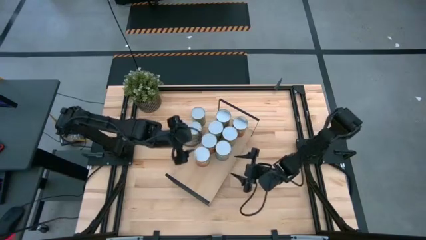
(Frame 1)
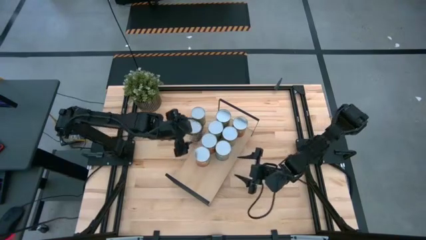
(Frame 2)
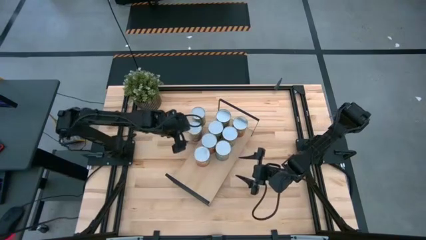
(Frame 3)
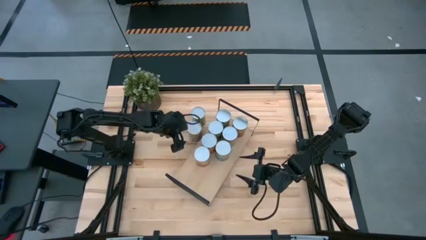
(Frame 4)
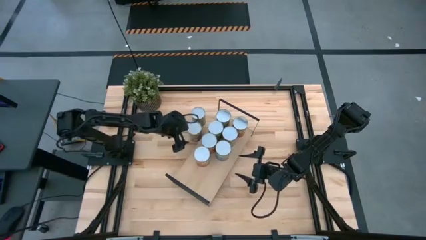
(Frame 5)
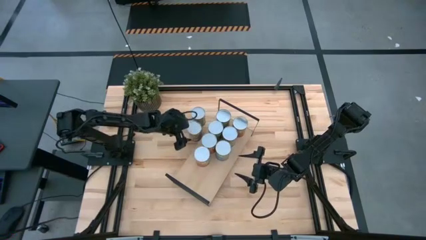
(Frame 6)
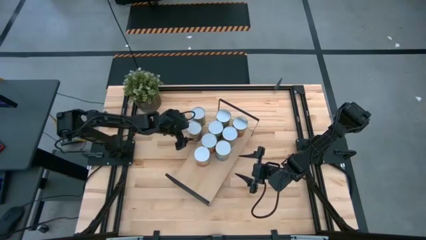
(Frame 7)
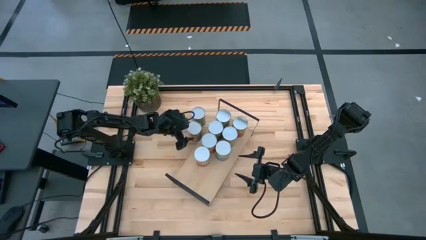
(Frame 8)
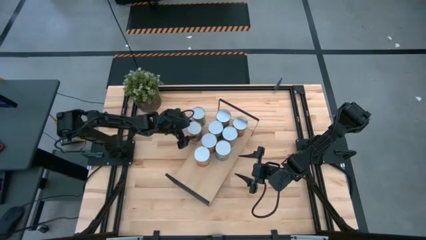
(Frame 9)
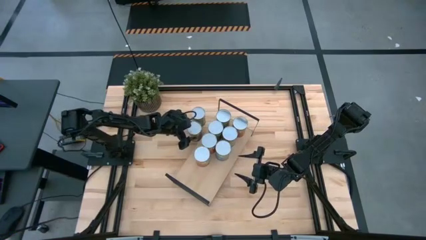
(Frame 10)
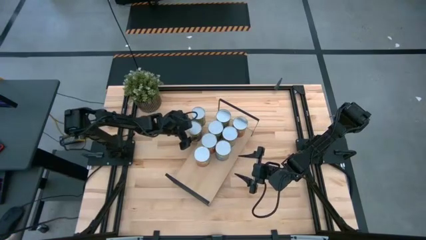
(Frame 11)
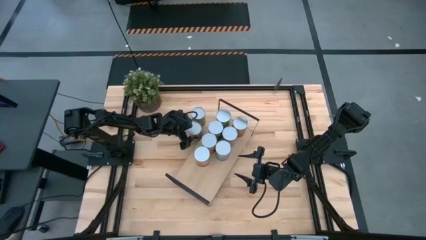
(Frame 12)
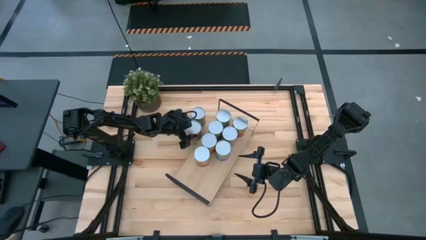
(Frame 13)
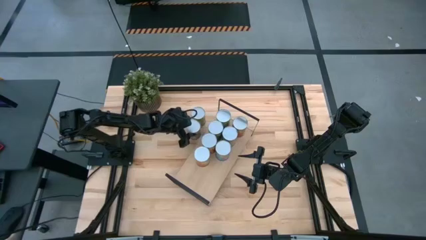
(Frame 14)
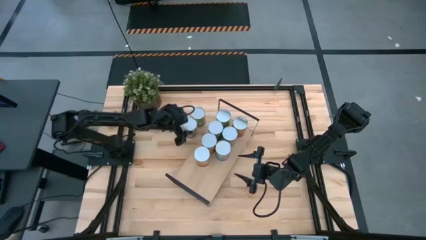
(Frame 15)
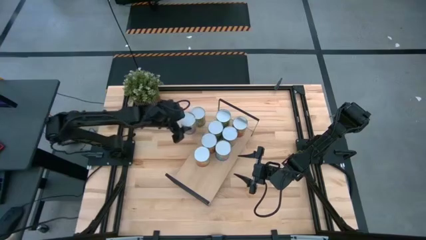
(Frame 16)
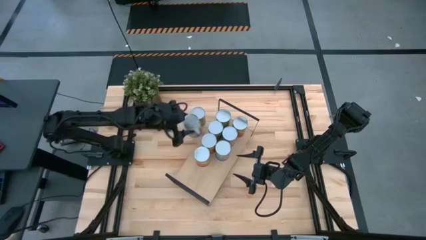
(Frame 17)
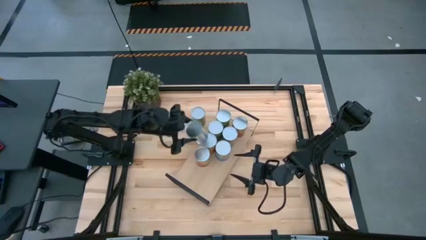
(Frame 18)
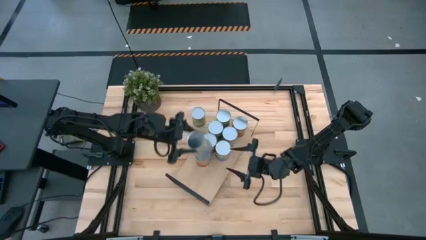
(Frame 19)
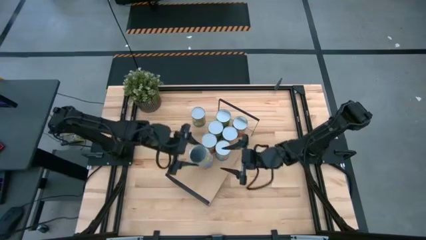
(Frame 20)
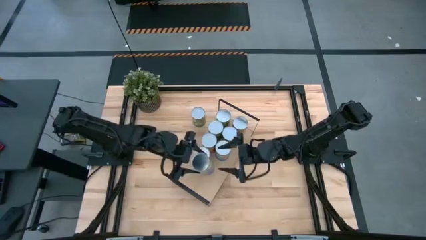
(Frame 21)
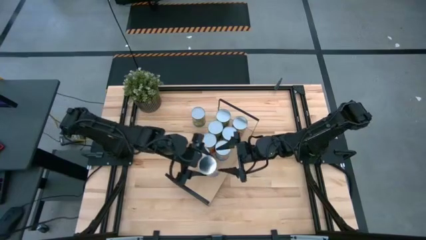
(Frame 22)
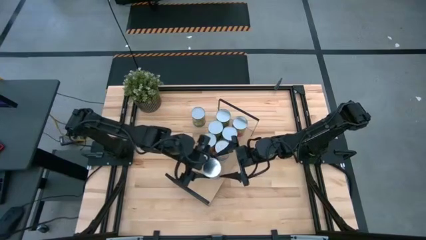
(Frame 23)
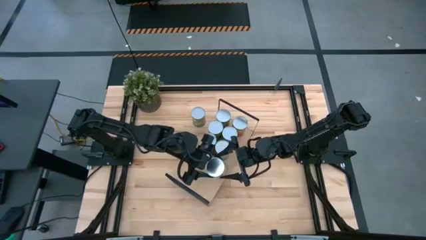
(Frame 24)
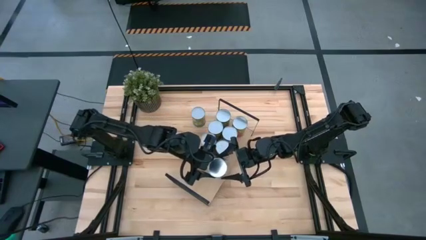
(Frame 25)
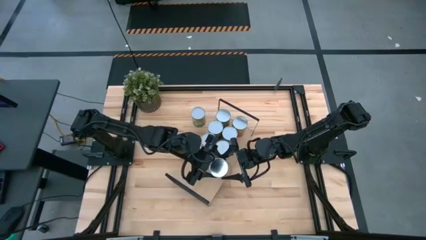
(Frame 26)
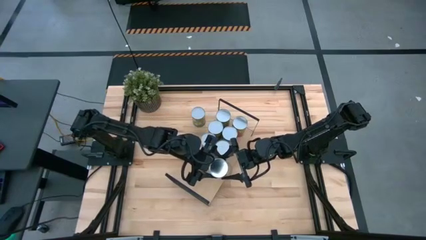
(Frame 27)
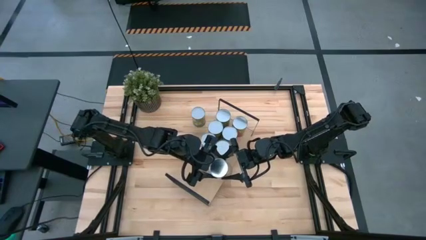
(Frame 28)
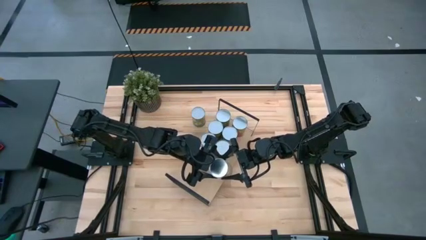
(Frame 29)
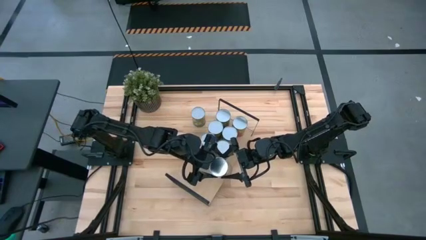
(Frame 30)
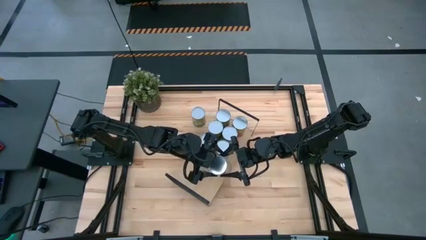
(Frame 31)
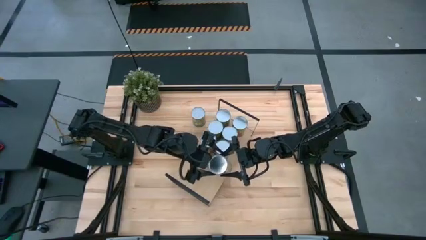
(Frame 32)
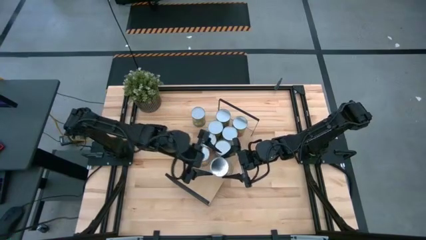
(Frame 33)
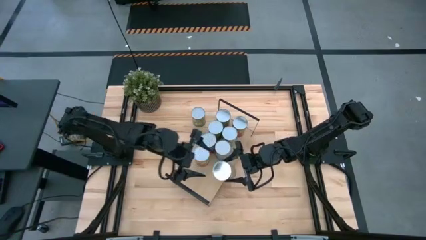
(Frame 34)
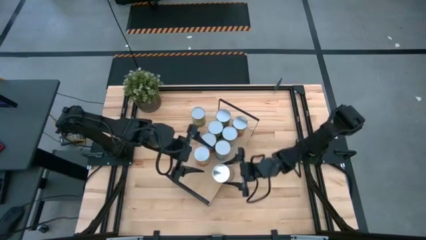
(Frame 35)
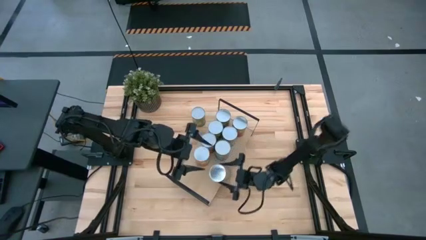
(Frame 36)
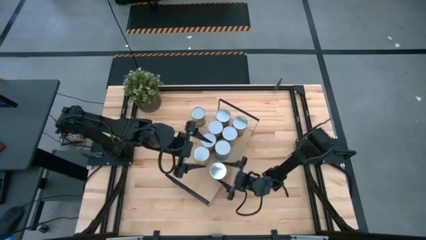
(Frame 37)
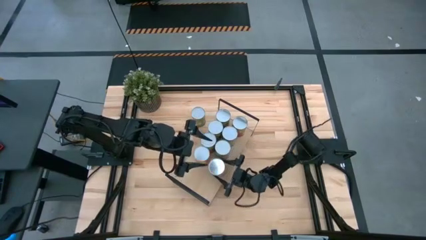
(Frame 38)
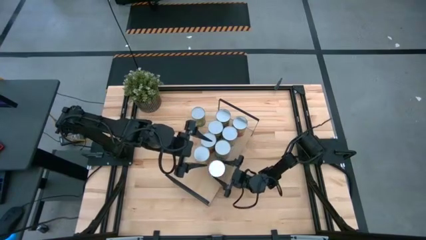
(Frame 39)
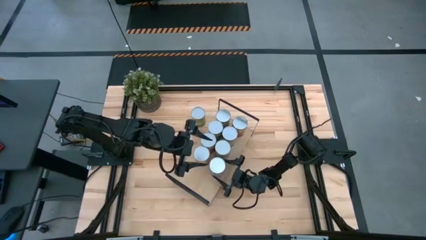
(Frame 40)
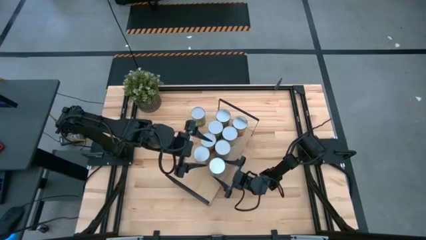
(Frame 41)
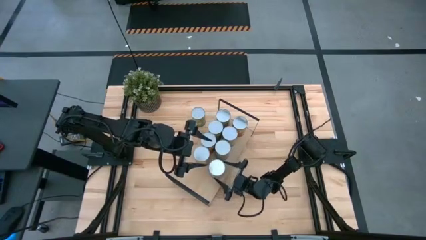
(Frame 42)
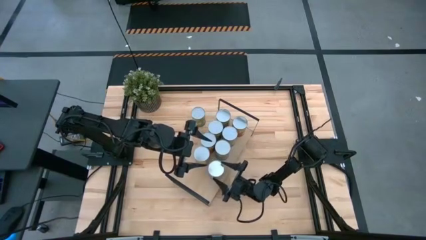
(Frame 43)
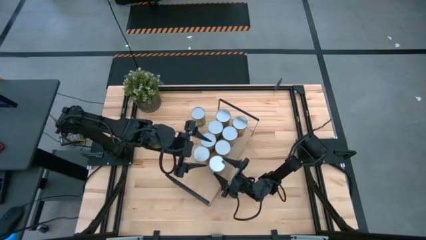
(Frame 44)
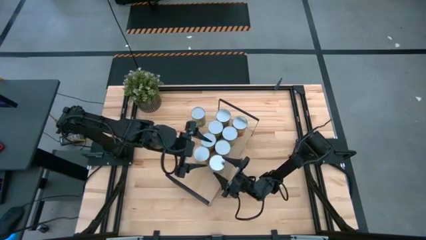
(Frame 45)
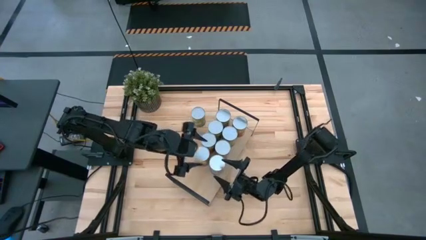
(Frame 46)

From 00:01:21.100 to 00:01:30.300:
Task: Pick and place cans onto a shelf
Put the canned peaches on the shelf

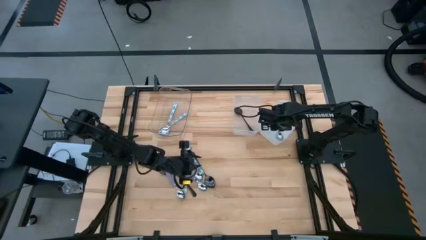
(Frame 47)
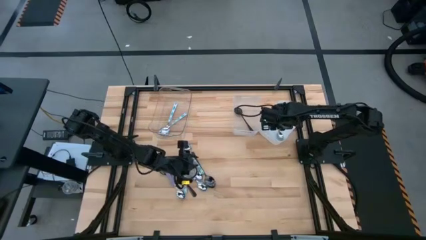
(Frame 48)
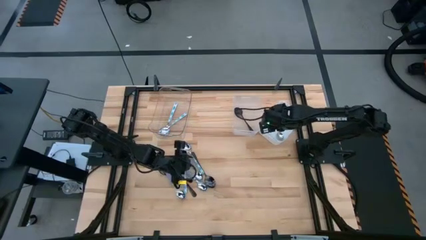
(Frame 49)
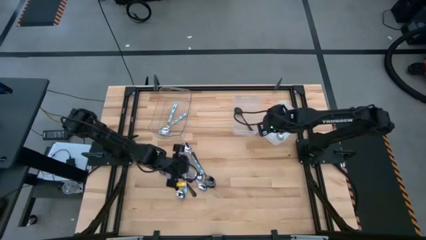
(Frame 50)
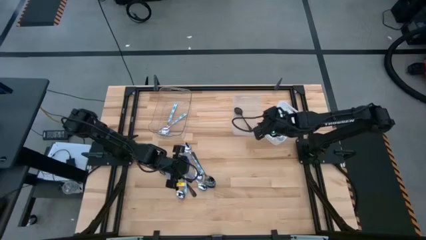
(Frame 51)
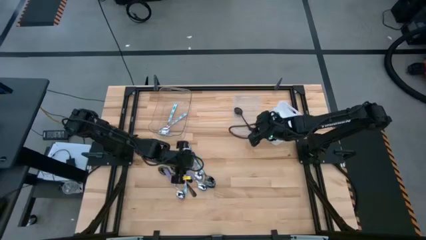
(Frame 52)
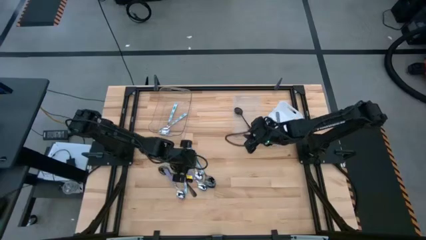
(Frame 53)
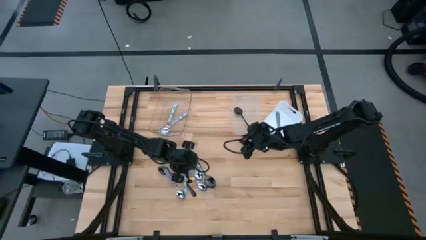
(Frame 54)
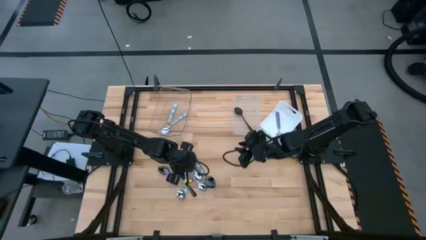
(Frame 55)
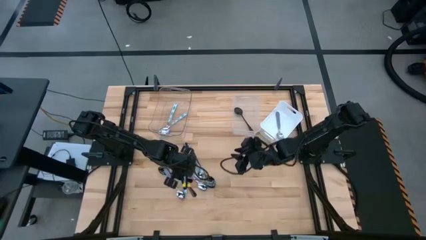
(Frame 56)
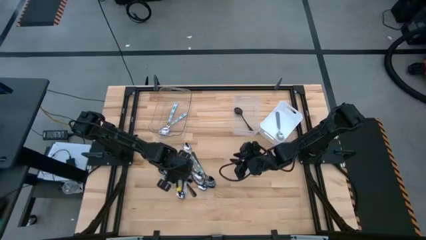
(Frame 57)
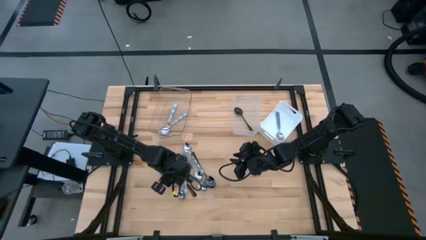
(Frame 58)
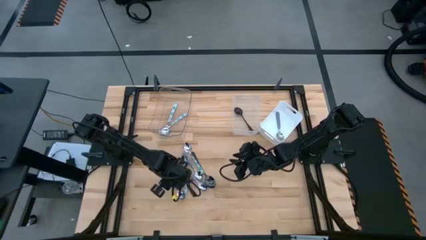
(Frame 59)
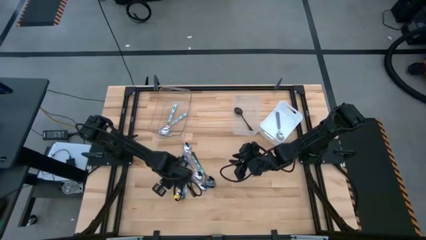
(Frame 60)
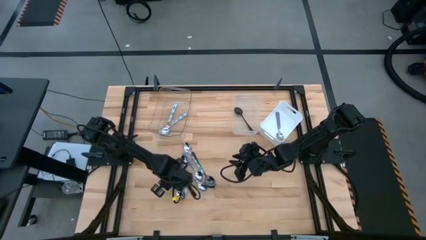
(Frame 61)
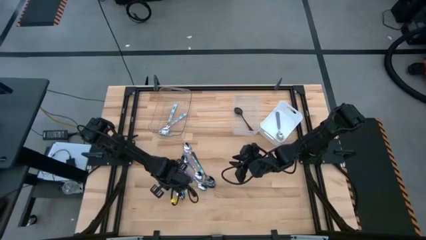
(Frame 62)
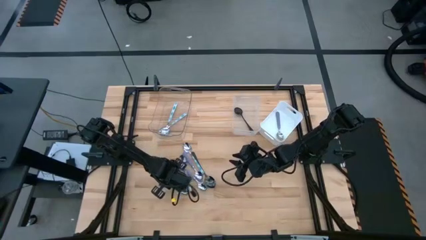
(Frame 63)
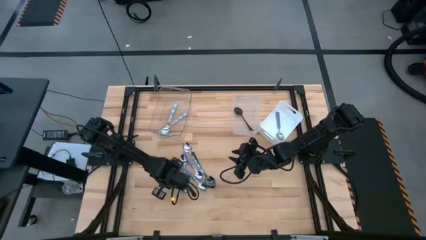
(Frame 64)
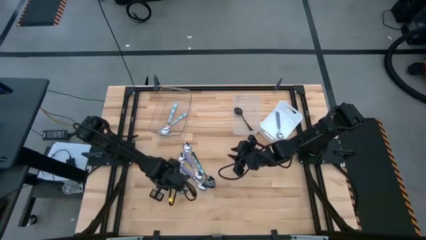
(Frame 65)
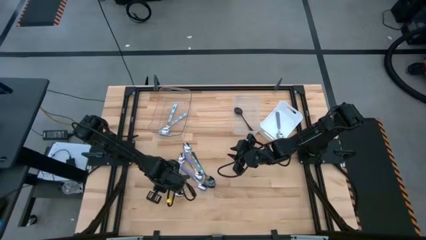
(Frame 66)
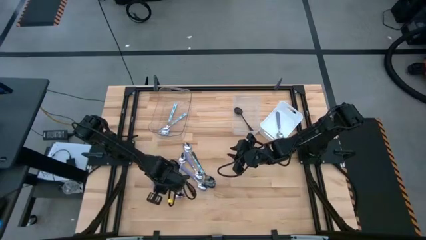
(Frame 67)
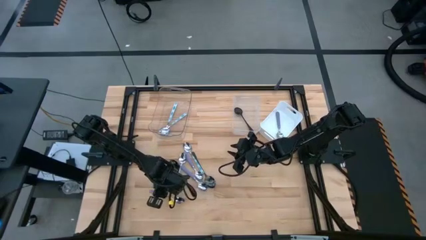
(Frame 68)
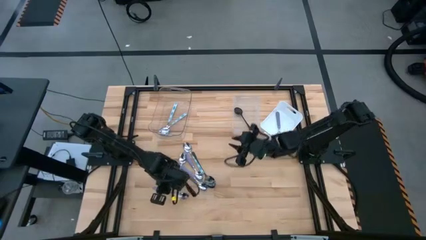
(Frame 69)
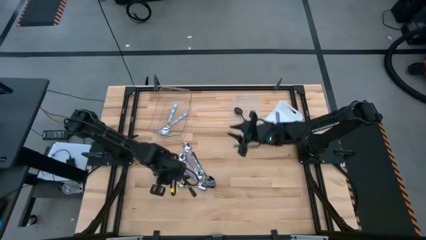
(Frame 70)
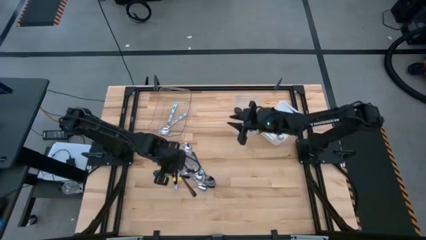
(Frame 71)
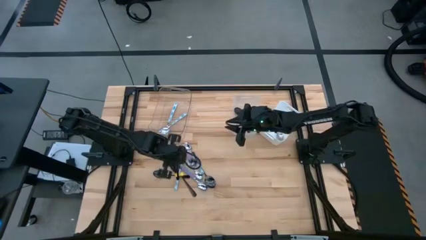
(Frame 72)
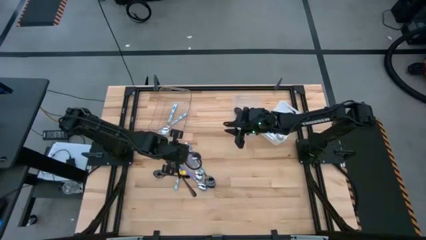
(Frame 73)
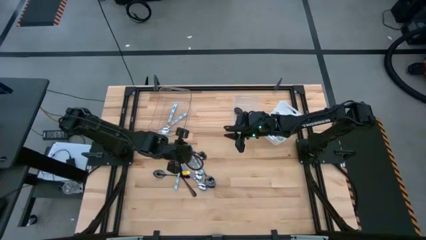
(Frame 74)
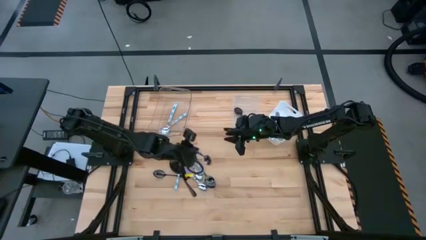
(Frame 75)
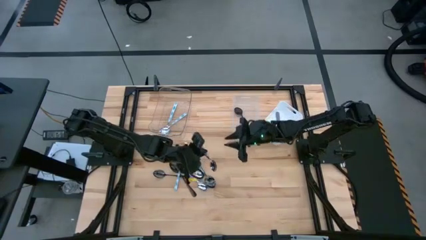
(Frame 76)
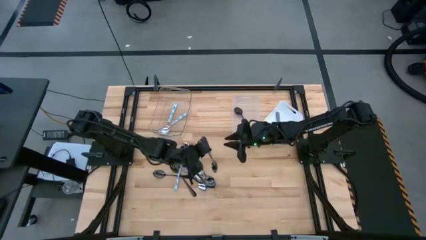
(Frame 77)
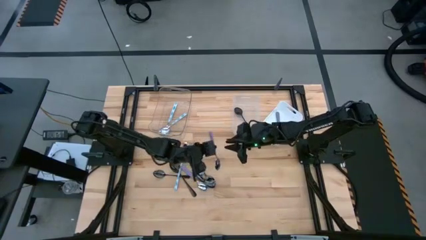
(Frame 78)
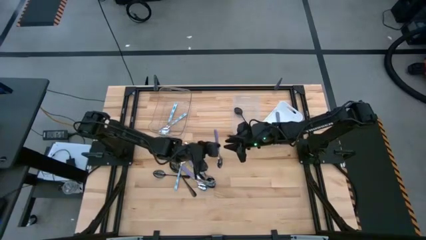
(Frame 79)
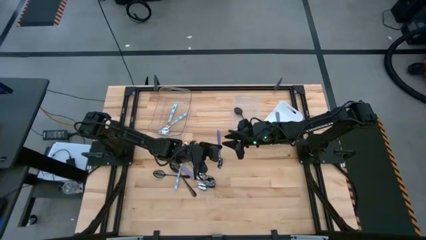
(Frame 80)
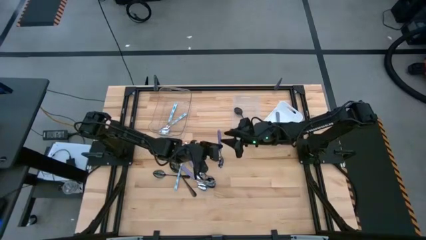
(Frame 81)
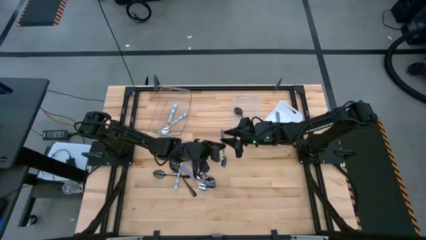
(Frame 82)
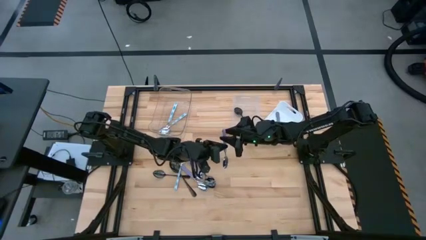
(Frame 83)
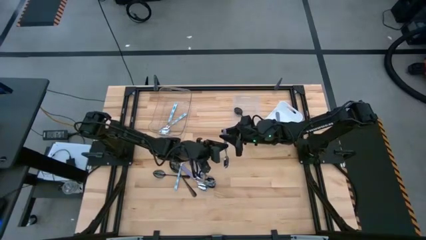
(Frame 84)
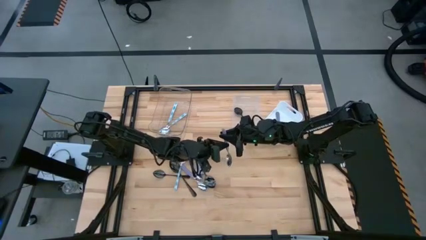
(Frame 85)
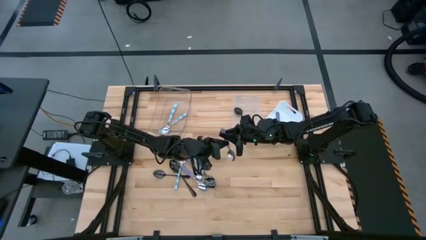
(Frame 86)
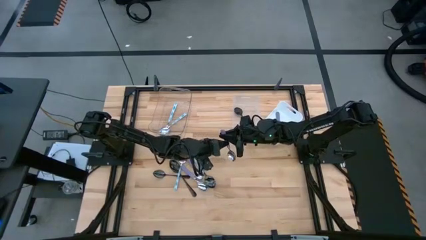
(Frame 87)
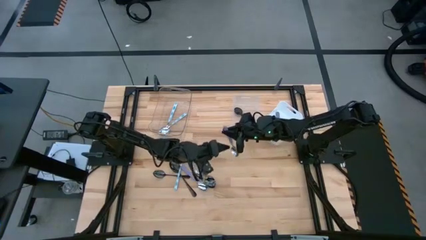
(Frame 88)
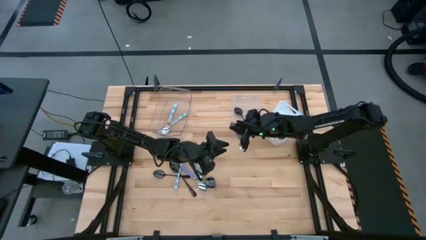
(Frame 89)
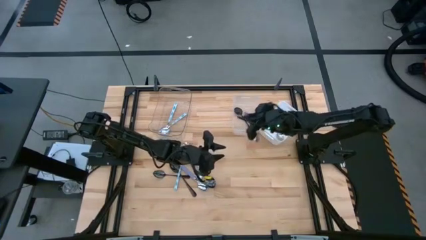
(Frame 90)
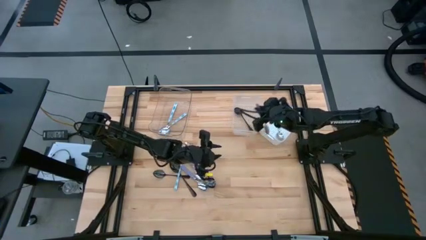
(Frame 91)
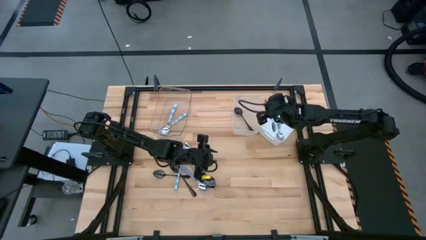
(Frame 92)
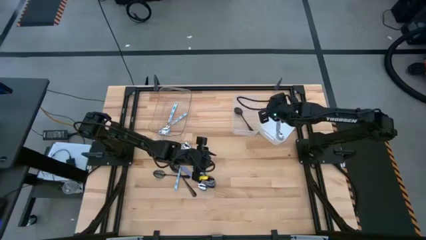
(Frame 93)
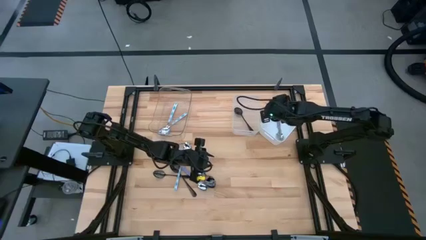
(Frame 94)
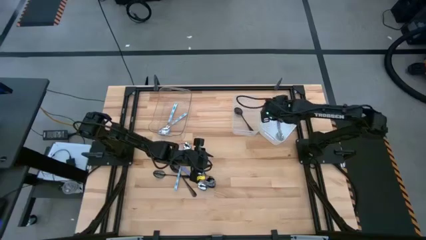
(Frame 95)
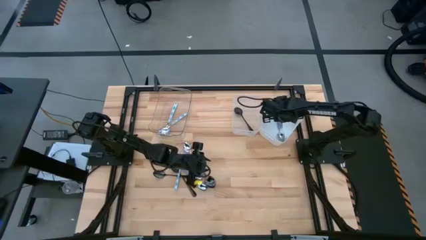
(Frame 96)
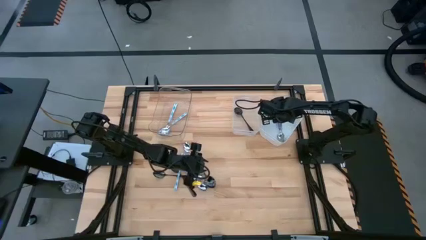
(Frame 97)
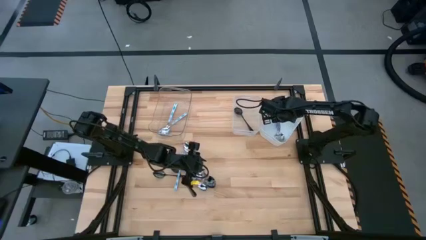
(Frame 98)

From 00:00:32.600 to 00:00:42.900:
Task: Sort silverware by color (type)
Put the purple spoon into the white bin
